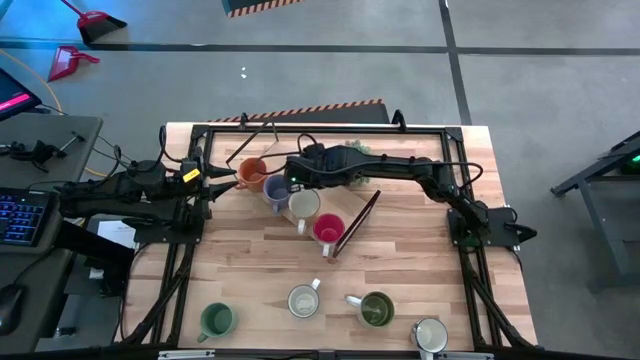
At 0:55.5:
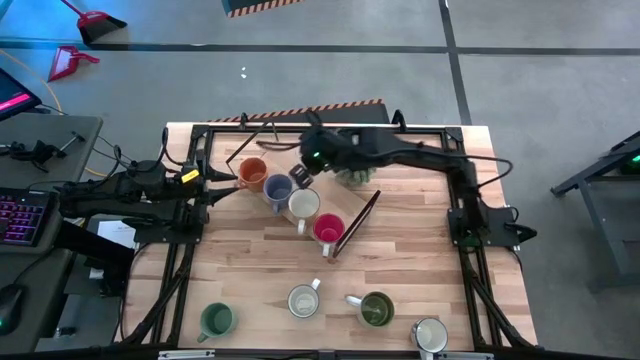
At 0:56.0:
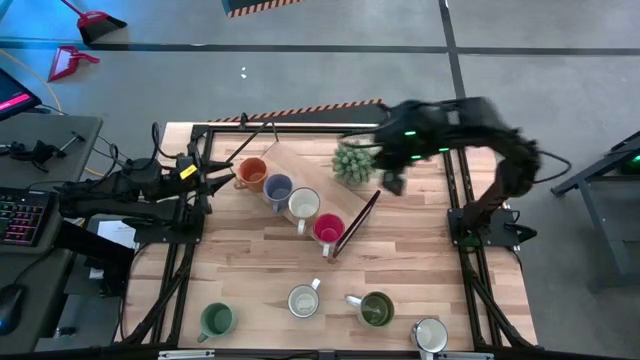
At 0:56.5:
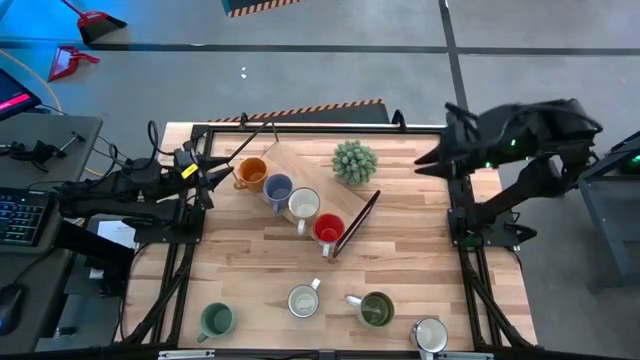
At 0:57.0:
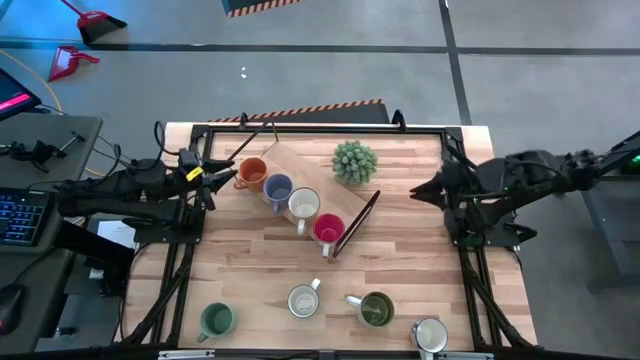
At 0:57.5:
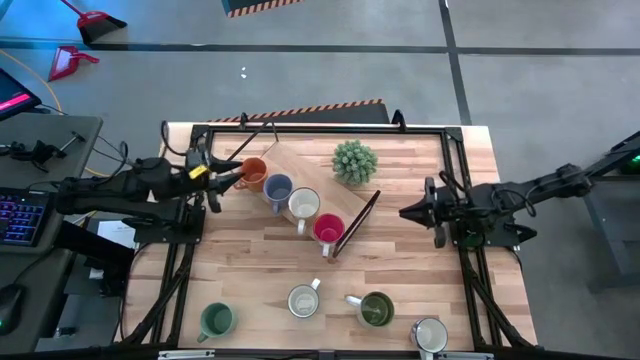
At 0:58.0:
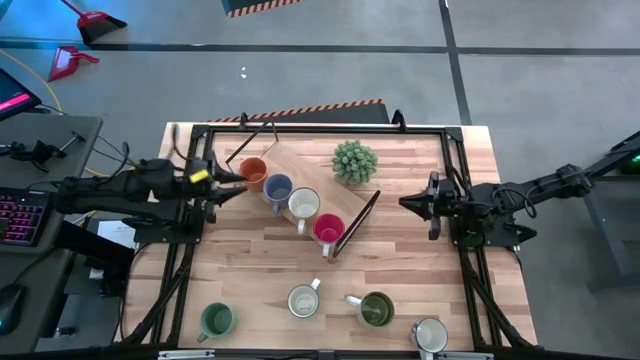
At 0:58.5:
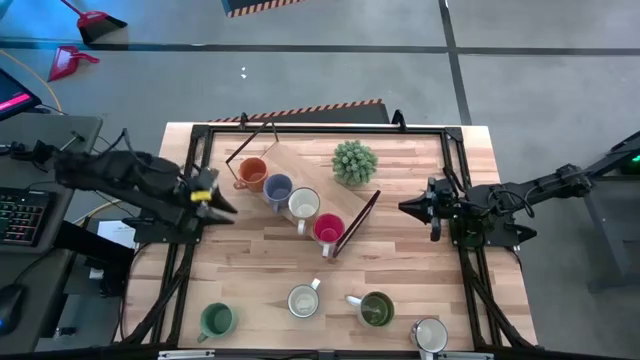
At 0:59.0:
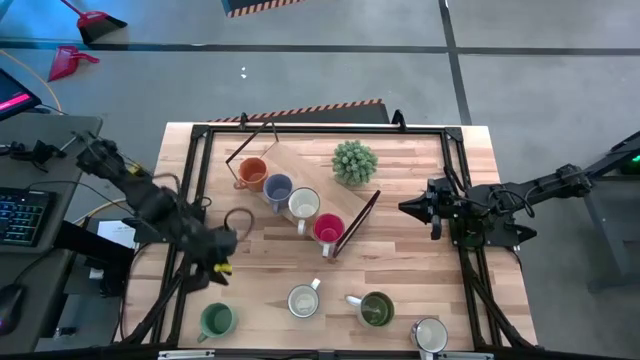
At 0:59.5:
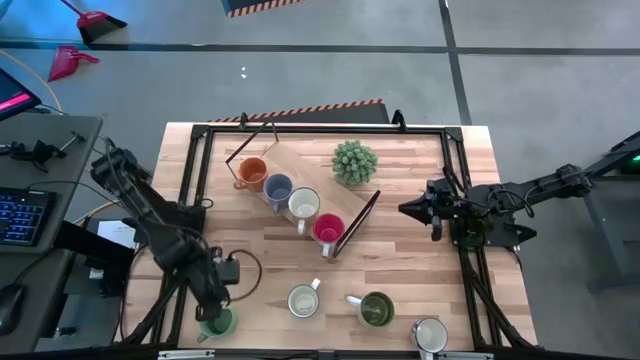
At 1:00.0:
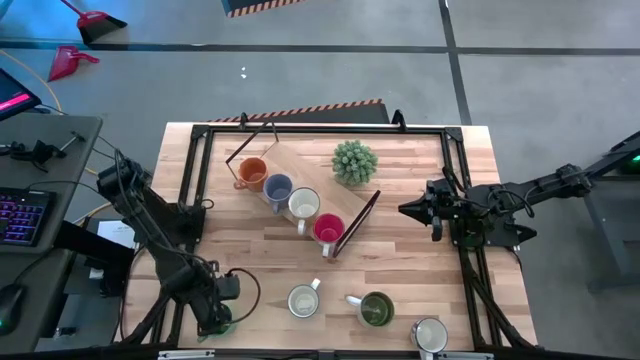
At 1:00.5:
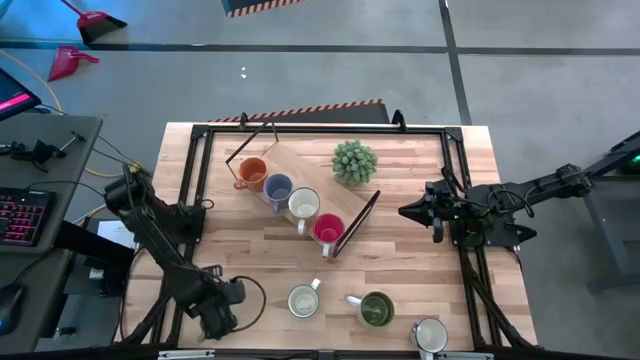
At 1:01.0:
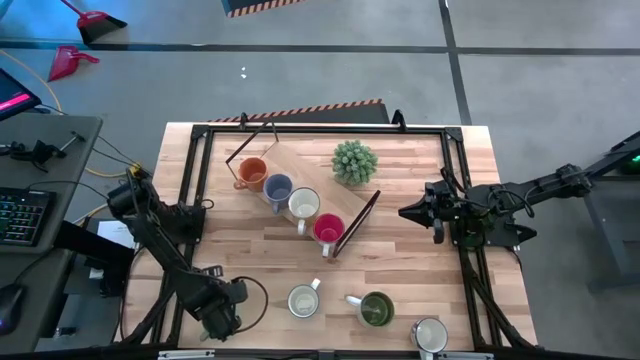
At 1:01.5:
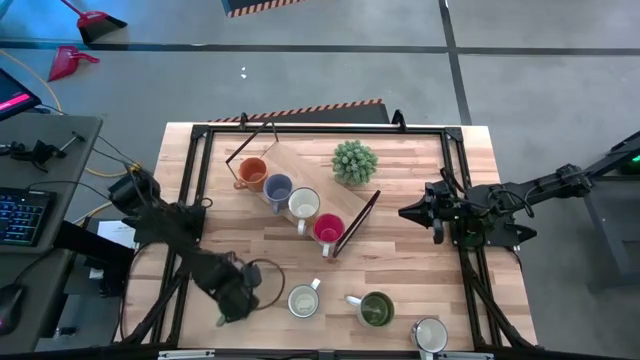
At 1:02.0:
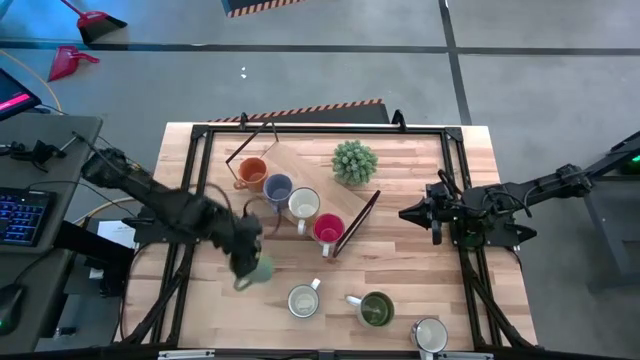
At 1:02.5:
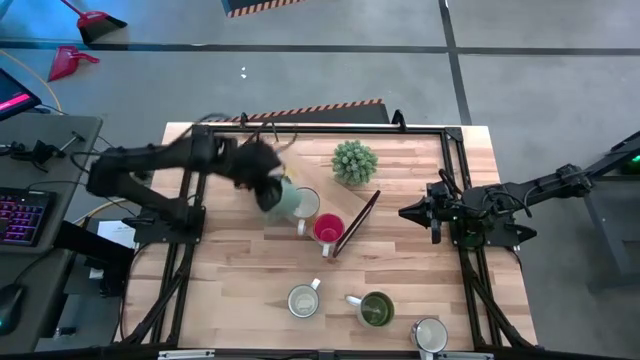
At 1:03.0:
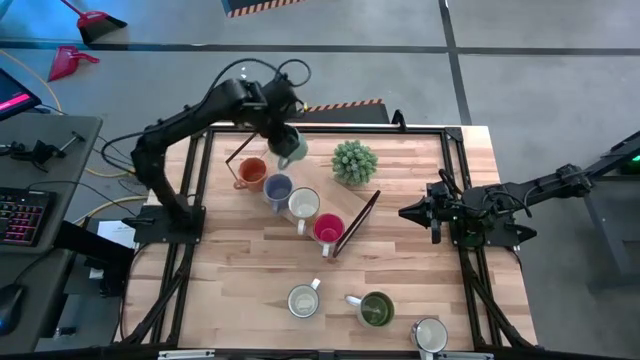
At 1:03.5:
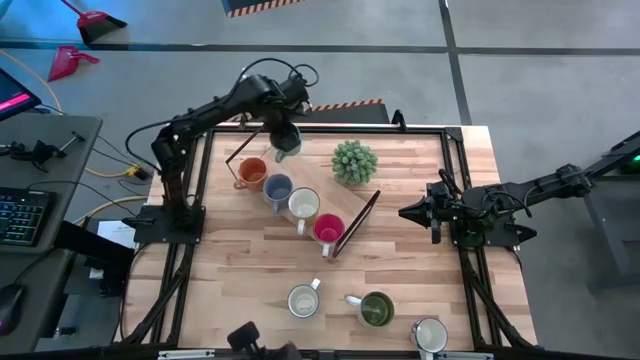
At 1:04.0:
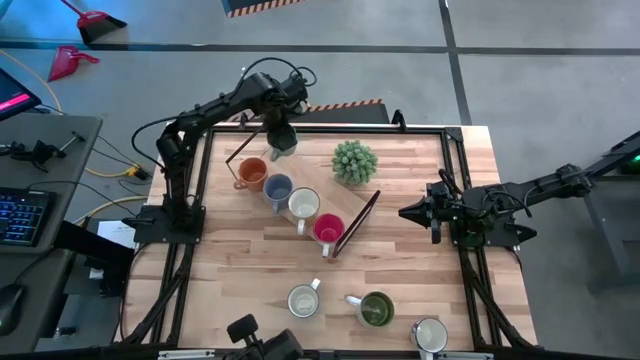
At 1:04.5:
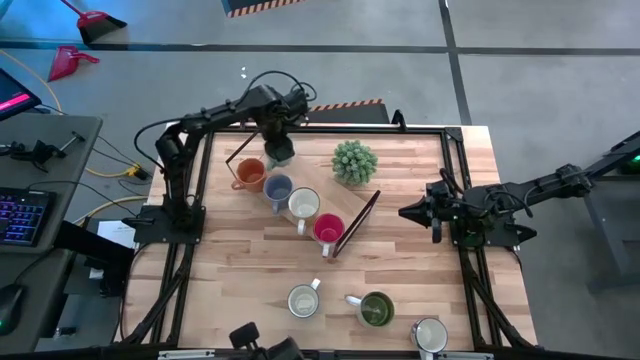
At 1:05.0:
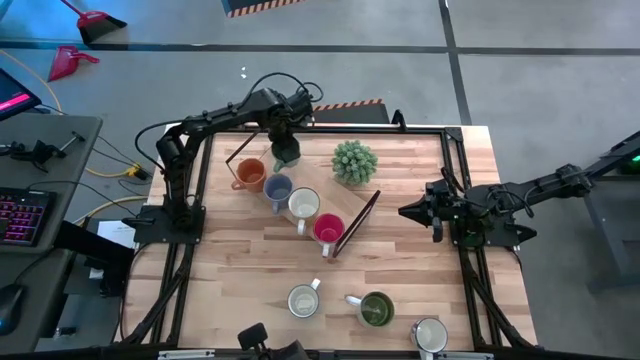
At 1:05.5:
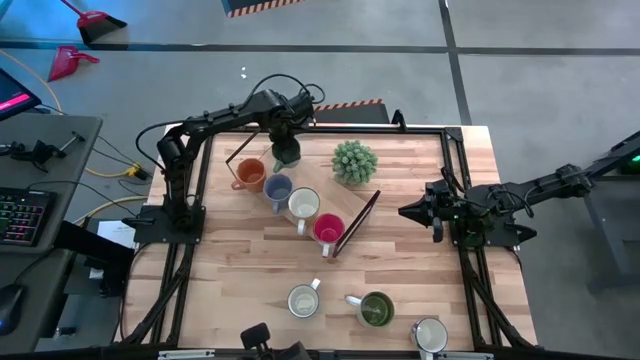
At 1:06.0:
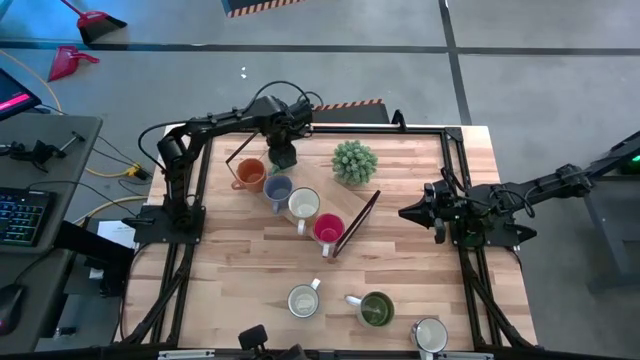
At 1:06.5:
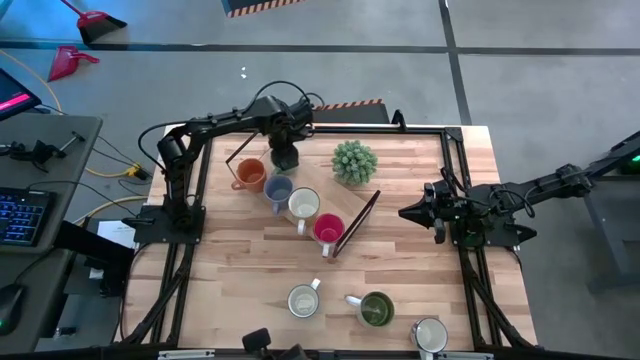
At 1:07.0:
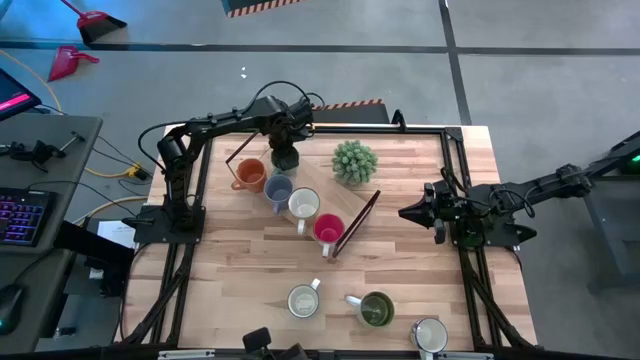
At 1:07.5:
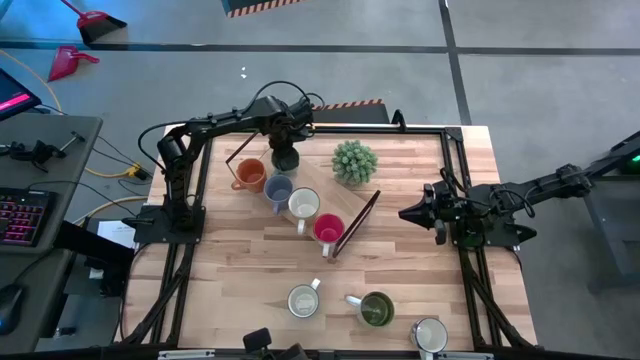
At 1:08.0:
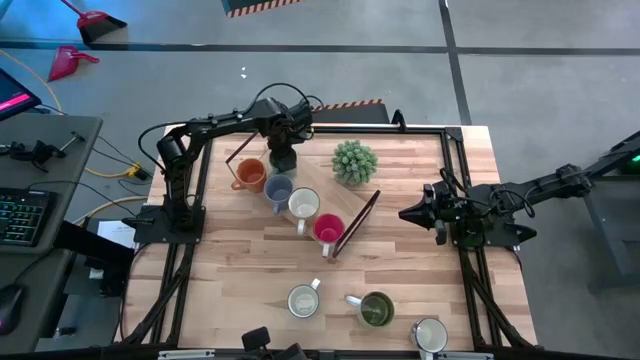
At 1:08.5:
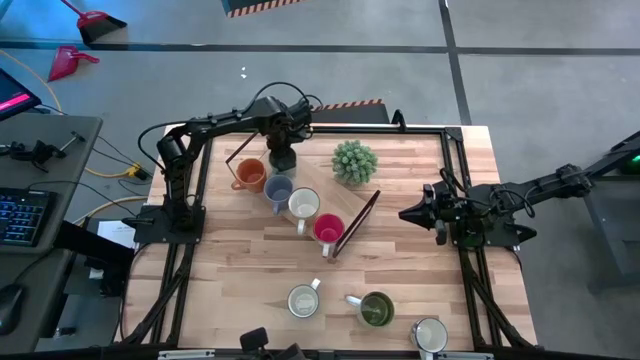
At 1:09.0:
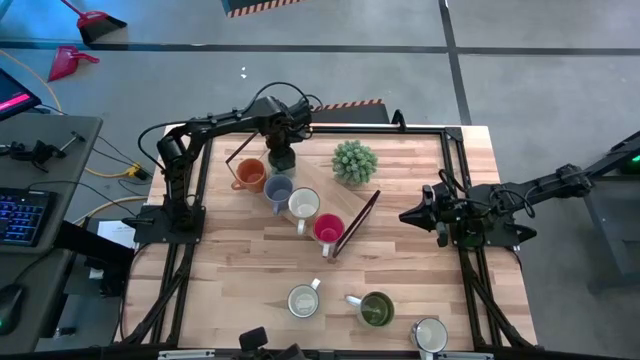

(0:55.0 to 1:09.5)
Task: Place coffee mugs
Put the light green mug on the shelf

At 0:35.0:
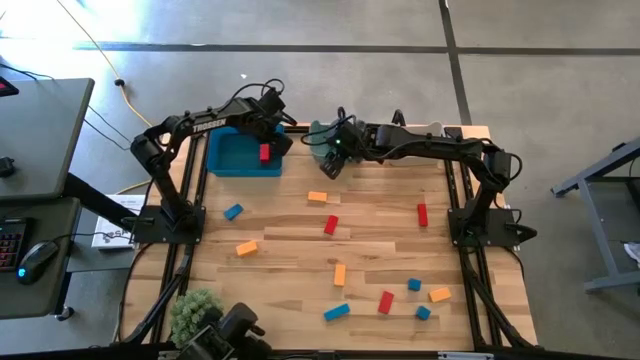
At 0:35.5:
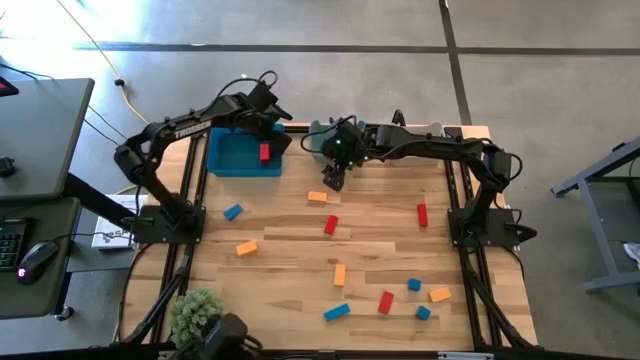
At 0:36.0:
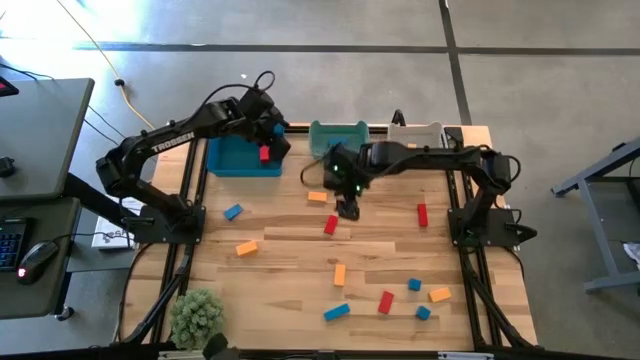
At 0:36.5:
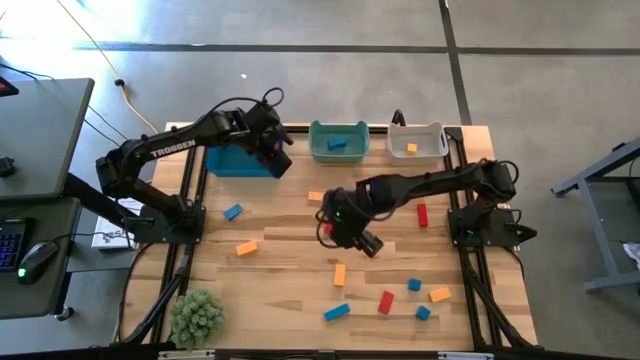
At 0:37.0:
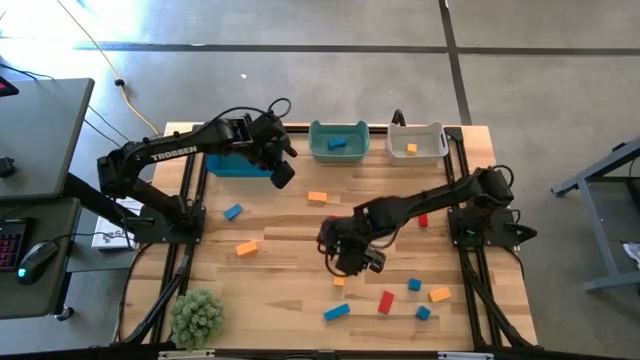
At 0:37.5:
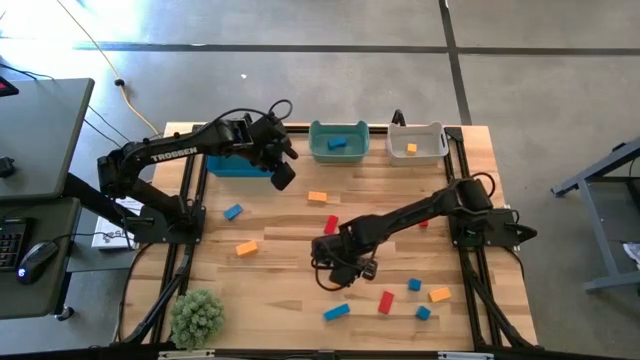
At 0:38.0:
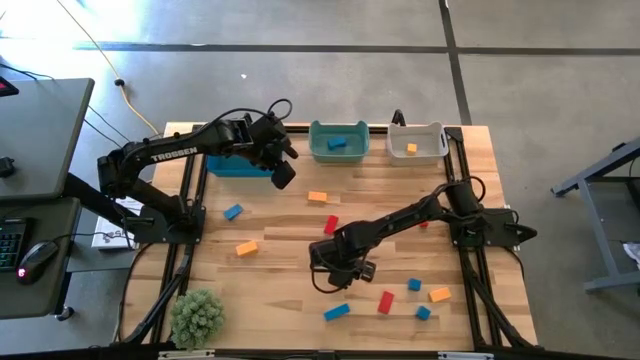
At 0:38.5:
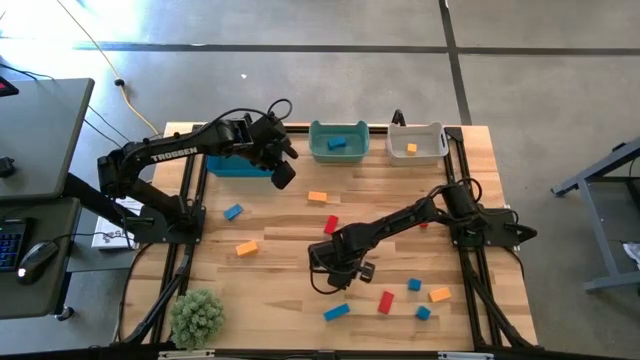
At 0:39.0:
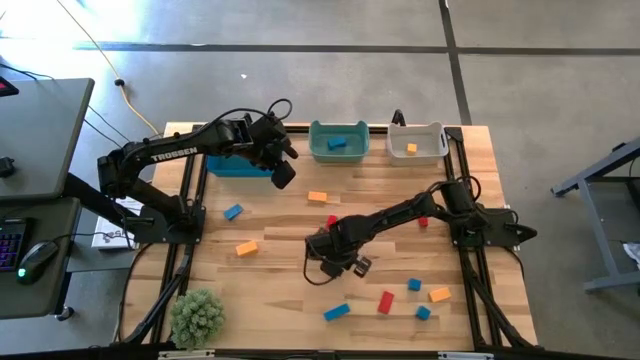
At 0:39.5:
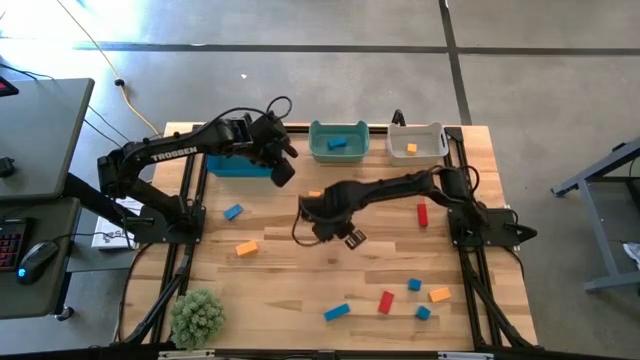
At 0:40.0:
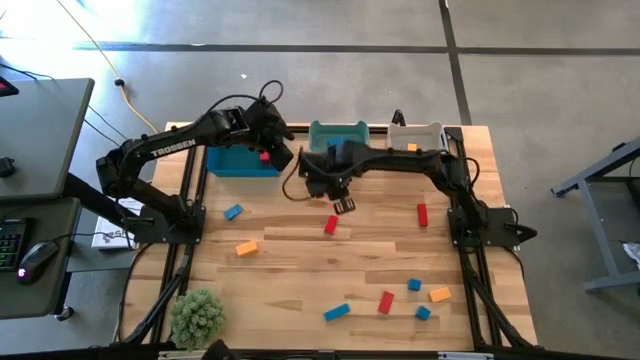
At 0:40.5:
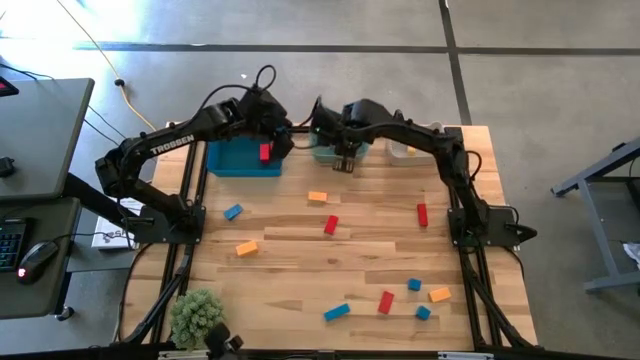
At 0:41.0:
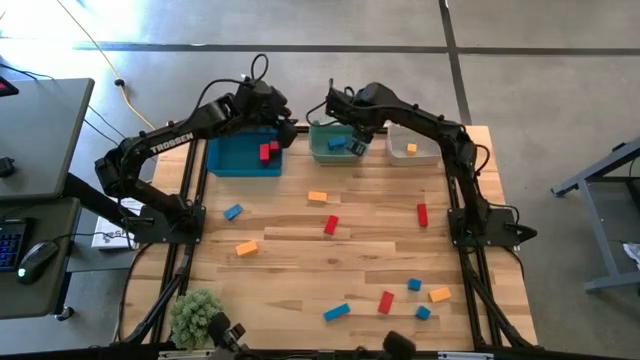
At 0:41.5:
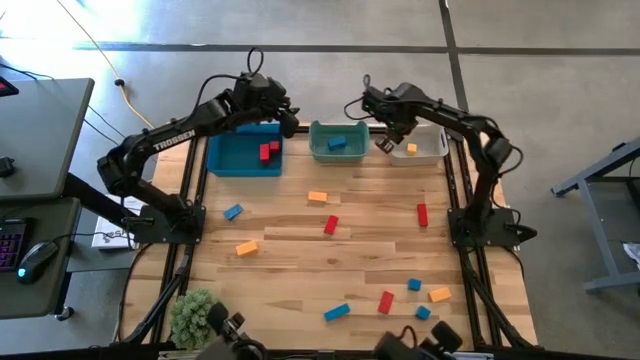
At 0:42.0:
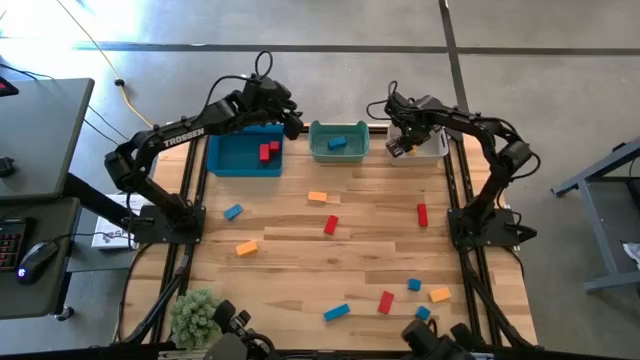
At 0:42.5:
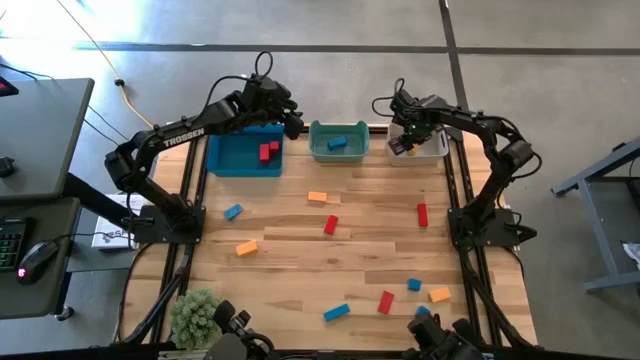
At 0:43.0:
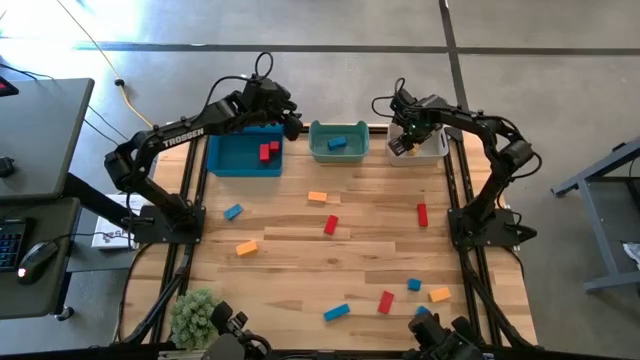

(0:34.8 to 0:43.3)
Task: Sort & place blocks by color
Put the yellow block into the gray bin
